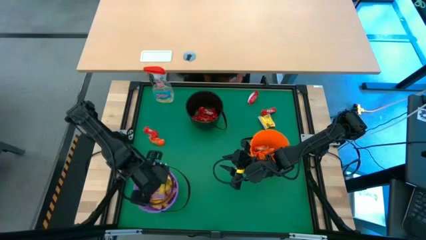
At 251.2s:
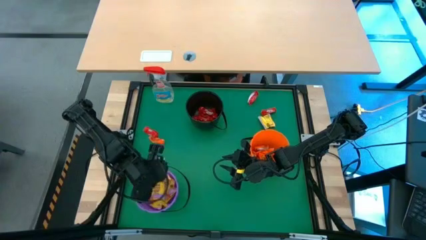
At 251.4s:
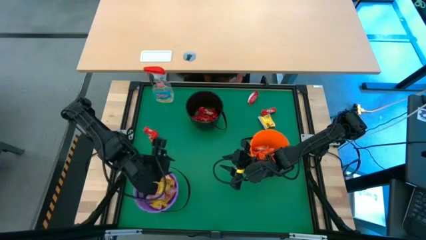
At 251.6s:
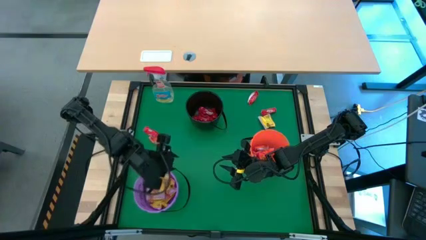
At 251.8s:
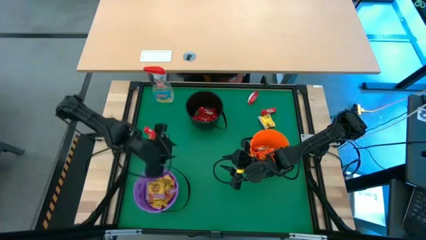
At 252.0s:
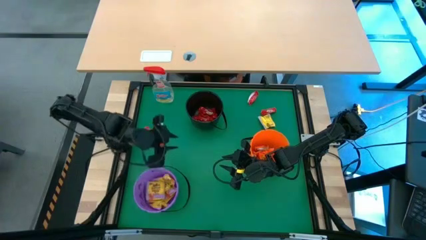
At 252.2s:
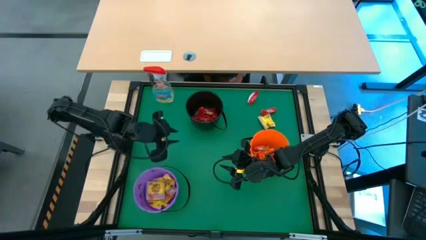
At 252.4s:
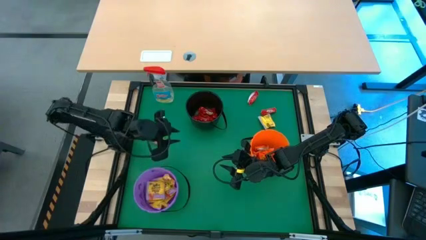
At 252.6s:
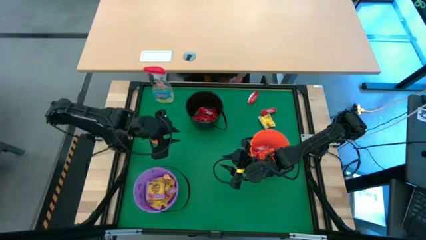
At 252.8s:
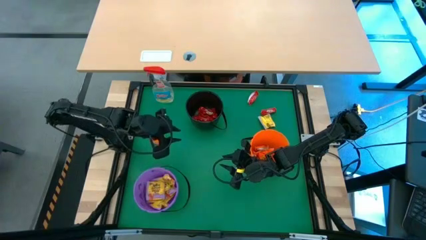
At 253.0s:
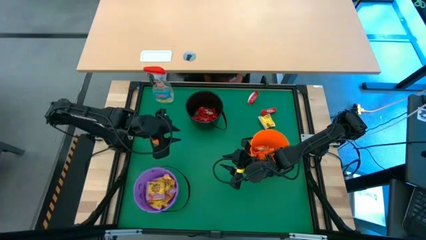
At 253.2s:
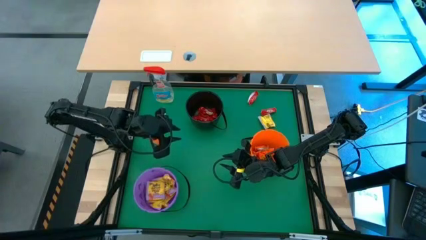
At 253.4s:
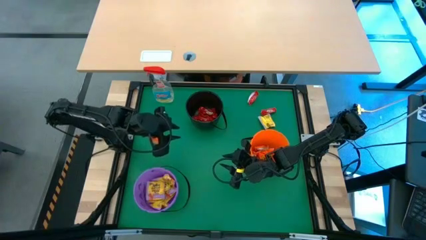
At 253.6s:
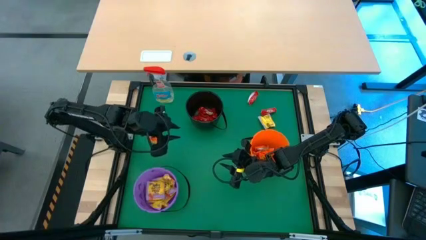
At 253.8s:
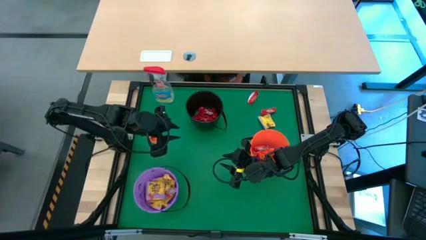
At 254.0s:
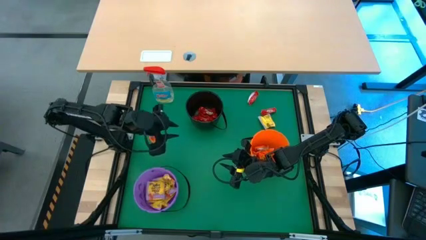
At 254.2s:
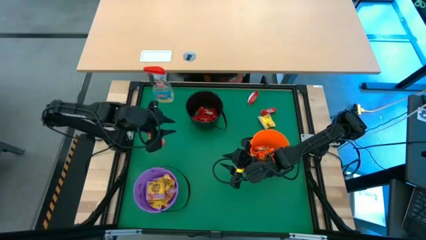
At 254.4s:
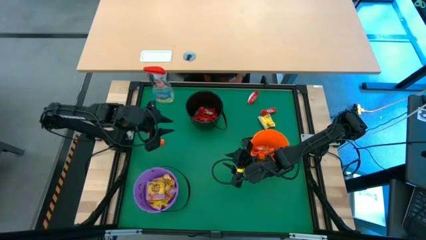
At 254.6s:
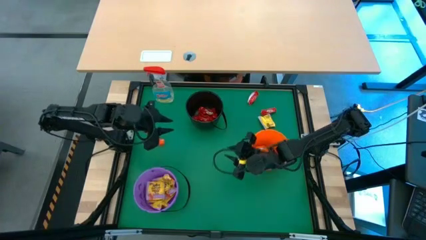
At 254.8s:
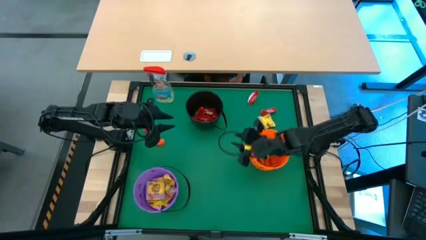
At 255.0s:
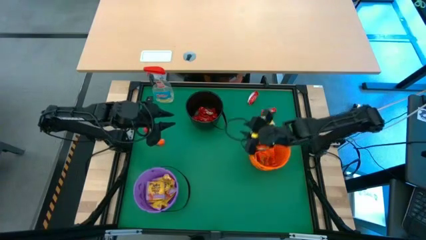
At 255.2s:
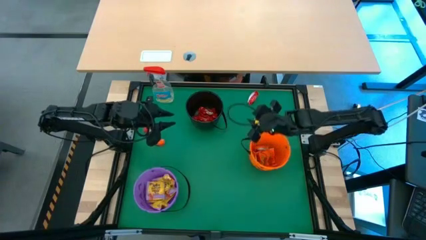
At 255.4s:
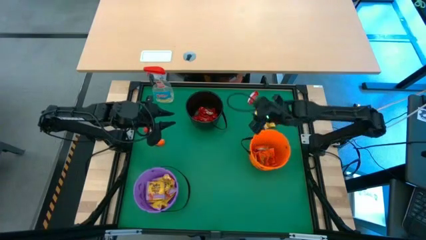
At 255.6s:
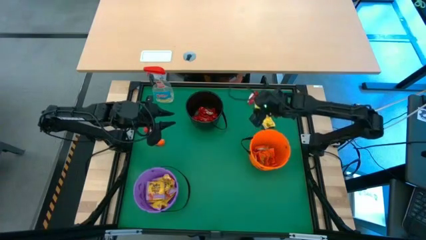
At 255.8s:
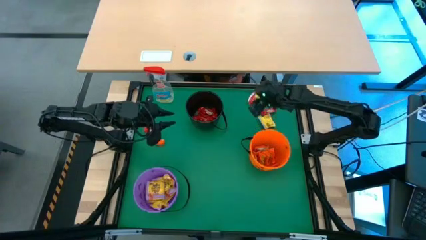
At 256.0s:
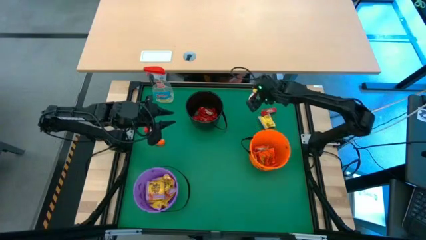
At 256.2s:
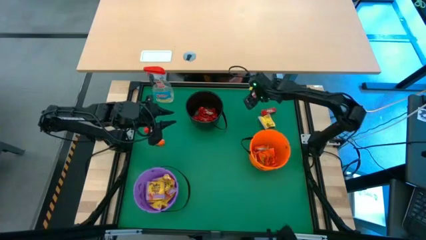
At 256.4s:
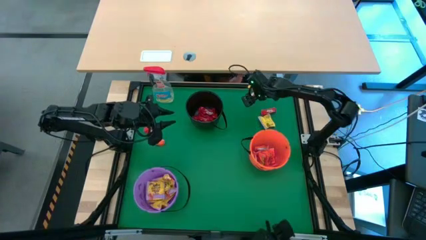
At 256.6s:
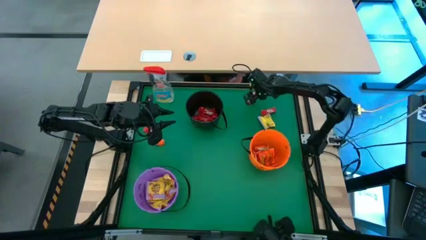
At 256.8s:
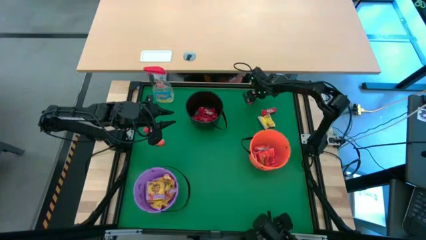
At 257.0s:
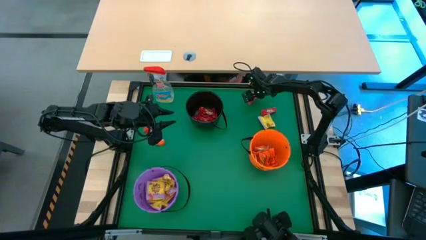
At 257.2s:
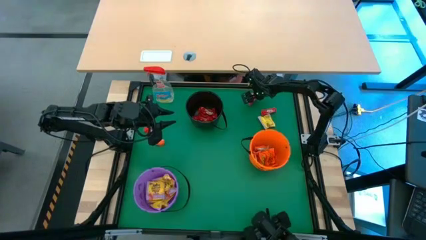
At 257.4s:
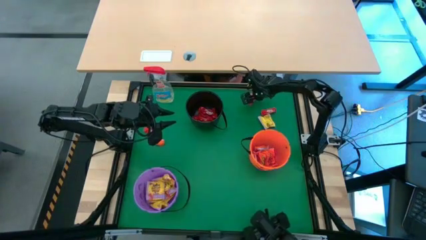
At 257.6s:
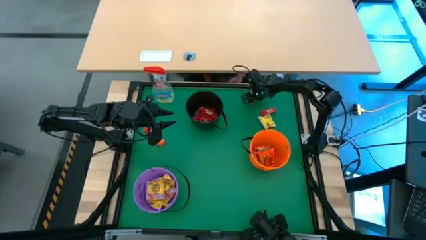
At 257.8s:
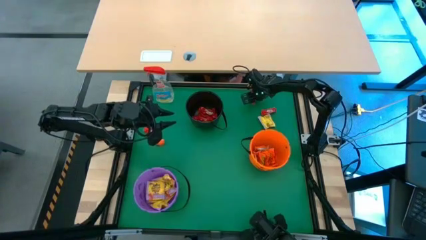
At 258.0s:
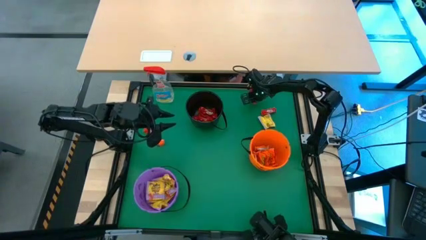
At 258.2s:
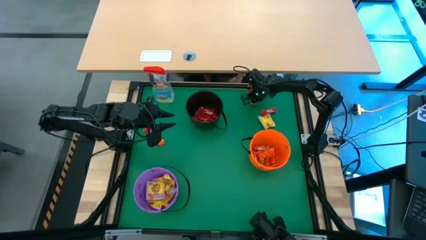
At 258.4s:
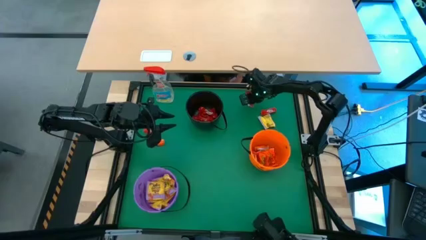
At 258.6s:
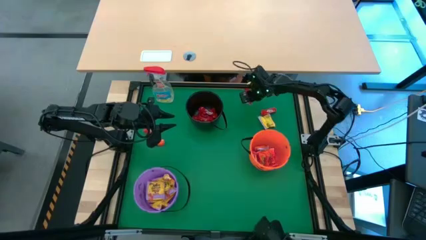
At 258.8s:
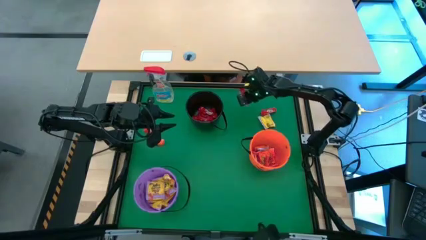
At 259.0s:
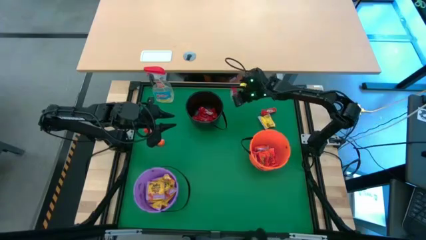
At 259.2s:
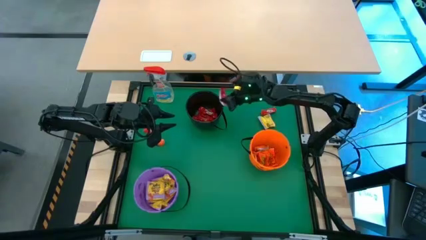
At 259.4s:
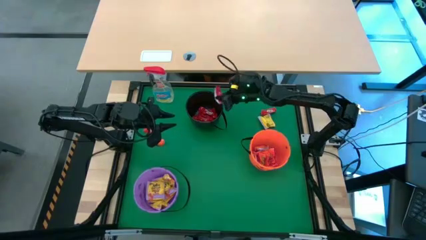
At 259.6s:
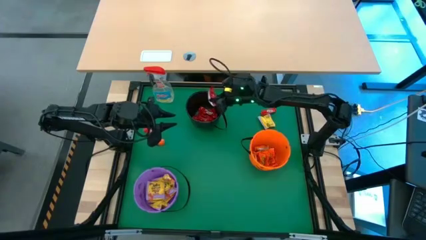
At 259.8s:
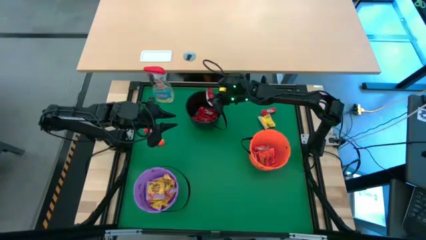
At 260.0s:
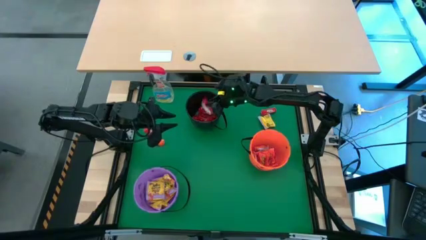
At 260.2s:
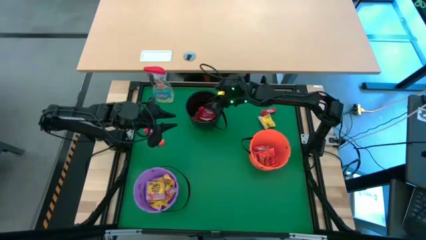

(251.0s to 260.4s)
Task: Sort candy
Put the red candy into the black bucket

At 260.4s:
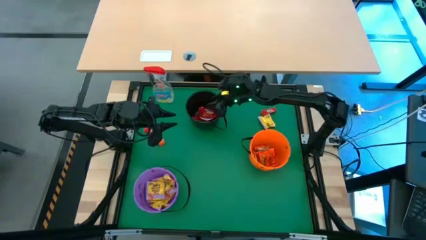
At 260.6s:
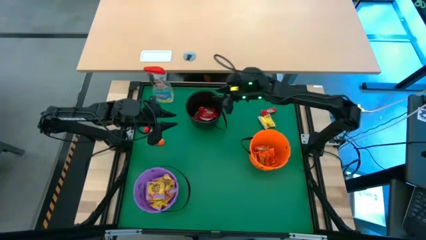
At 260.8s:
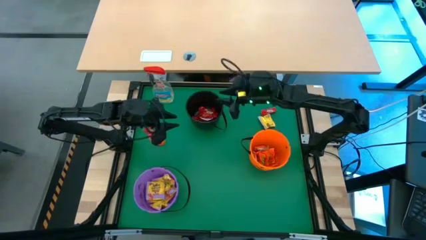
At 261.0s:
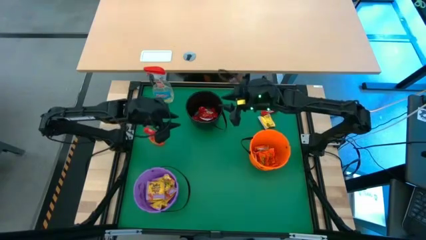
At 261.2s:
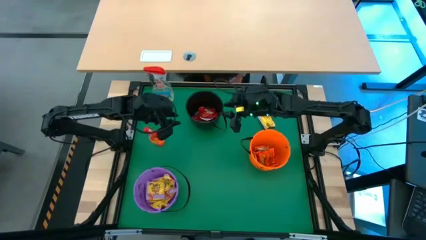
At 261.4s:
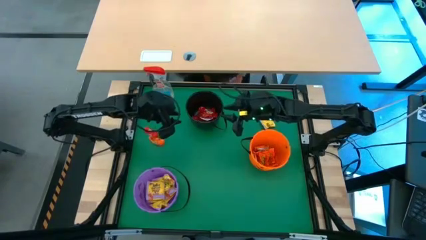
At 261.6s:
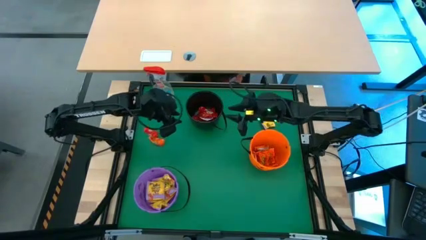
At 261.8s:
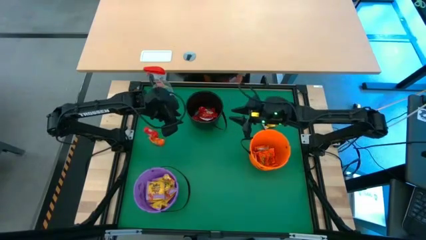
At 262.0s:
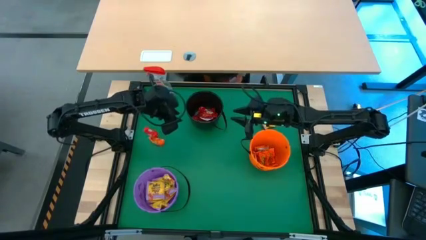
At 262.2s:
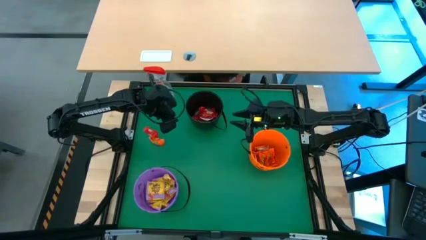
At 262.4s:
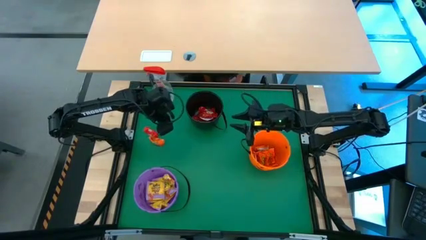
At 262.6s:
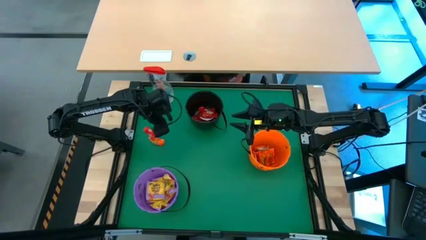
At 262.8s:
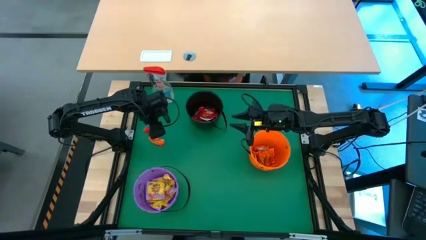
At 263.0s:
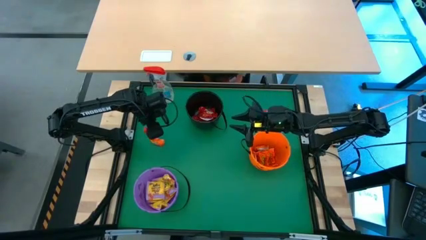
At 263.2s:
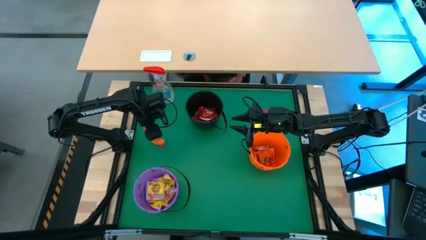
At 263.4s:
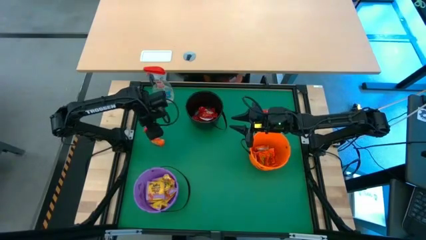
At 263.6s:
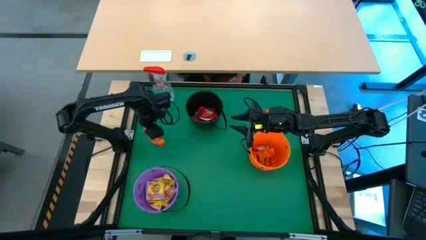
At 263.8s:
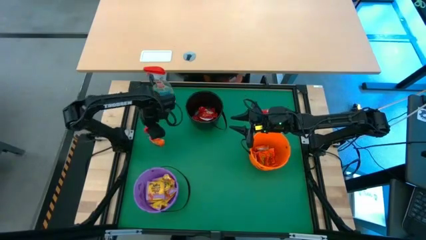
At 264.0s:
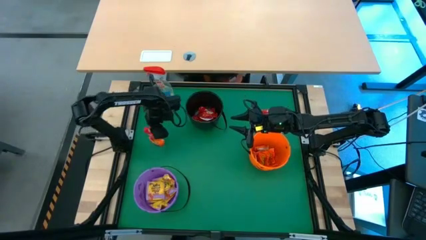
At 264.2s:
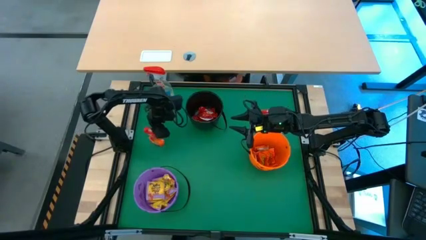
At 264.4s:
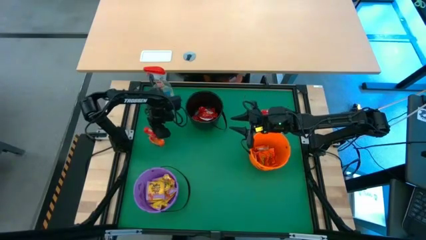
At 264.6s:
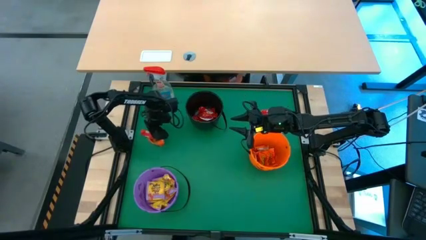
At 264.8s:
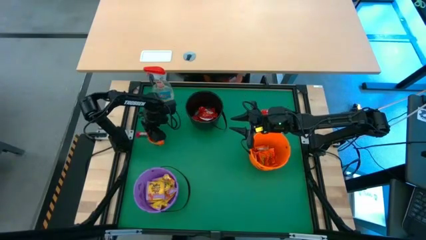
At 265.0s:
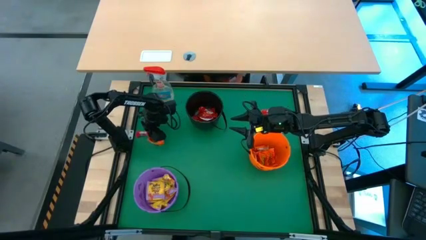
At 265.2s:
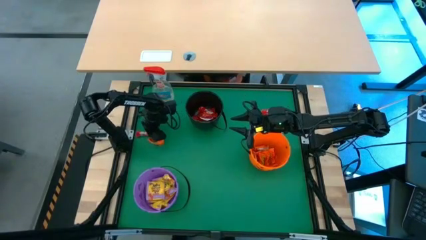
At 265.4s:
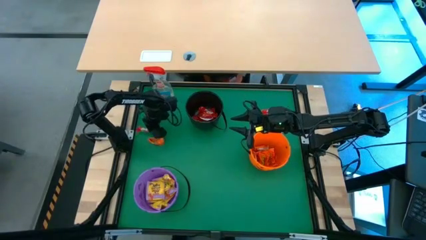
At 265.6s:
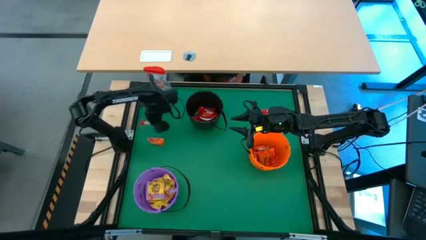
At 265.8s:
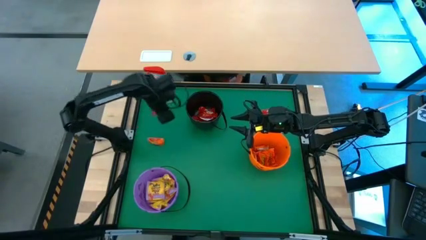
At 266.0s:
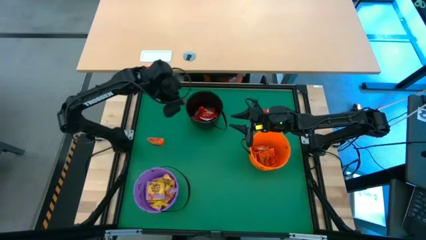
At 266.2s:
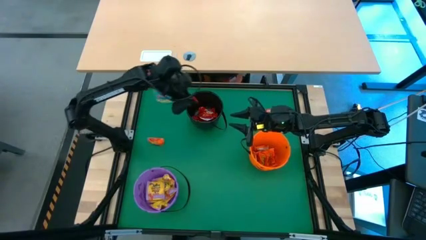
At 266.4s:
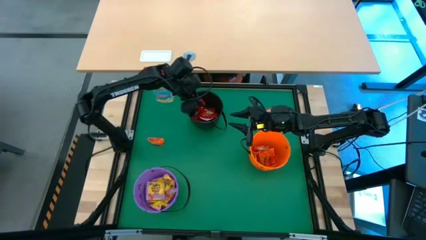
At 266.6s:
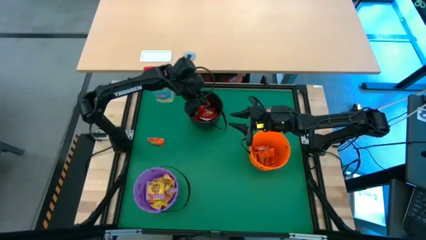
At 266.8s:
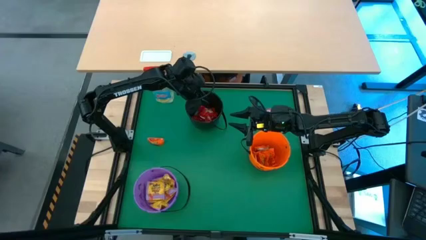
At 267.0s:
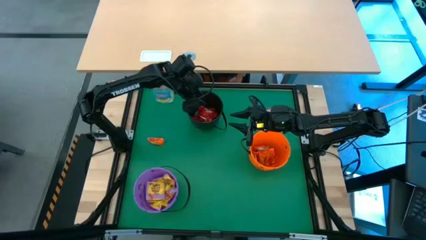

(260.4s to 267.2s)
Put the red candy into the black bucket

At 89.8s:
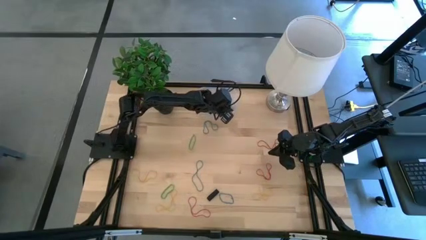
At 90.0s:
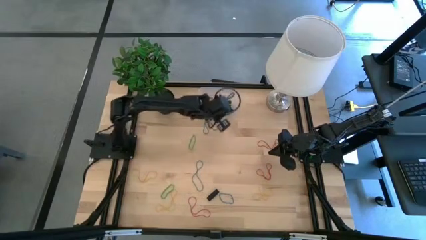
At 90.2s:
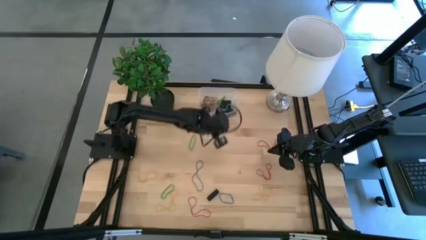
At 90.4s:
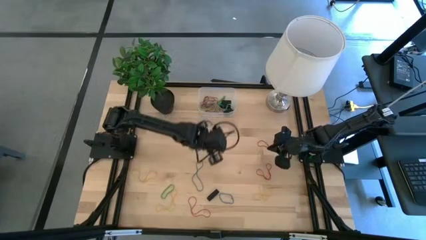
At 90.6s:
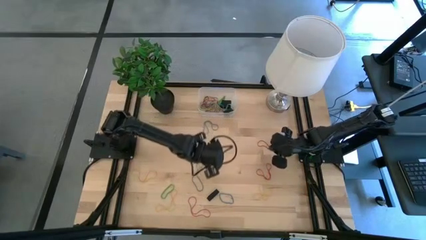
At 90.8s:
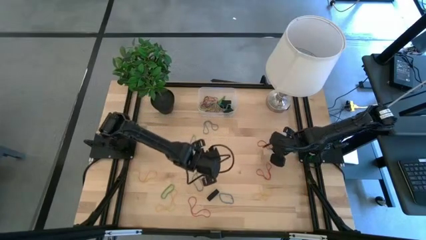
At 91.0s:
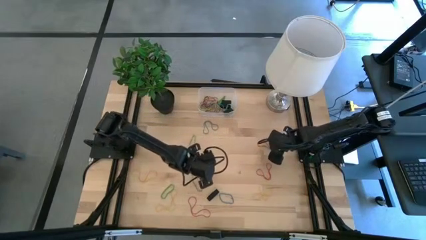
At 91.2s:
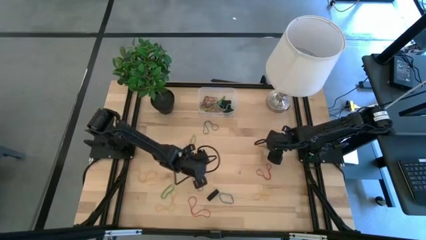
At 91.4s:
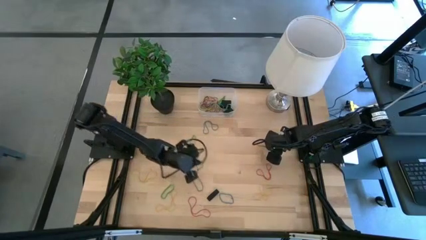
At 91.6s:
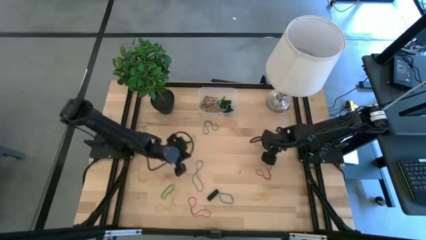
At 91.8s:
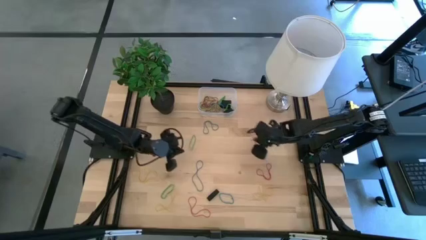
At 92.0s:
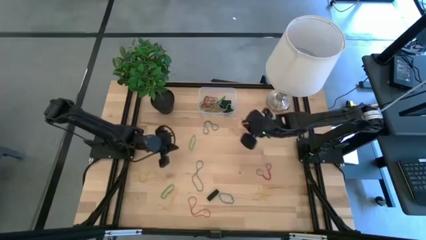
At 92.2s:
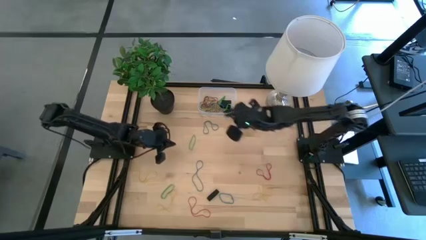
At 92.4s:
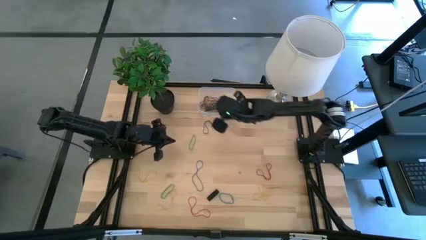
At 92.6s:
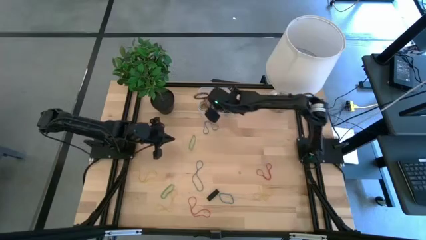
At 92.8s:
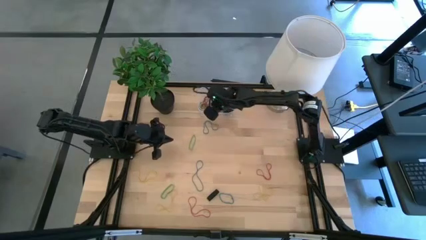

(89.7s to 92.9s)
Task: Pick and place rubber bands into bin
Put the red rubber band into the transparent bin
